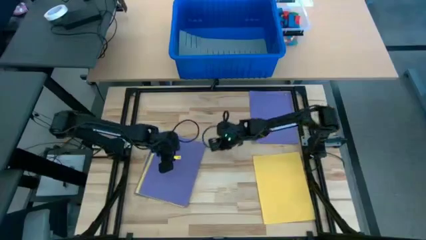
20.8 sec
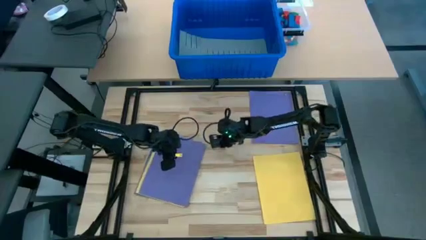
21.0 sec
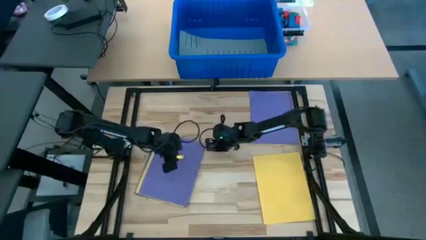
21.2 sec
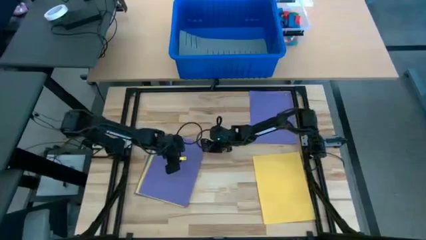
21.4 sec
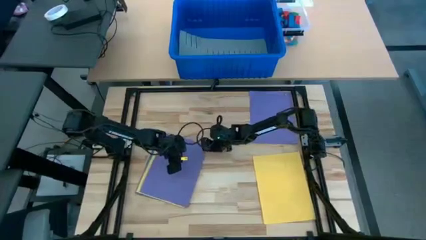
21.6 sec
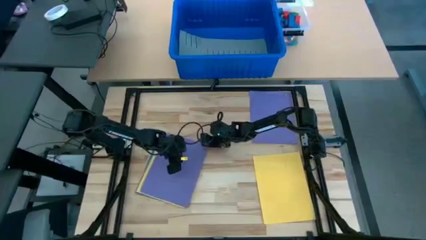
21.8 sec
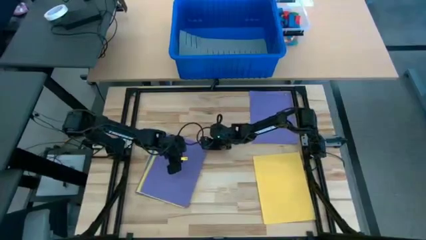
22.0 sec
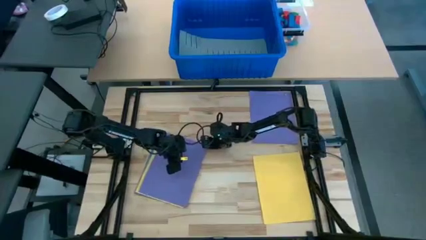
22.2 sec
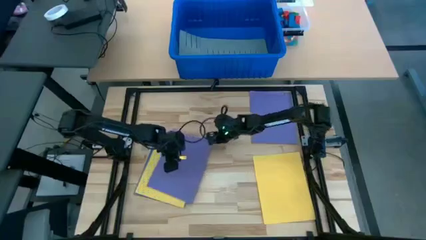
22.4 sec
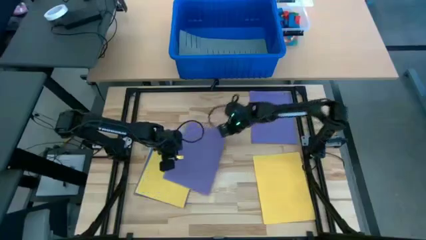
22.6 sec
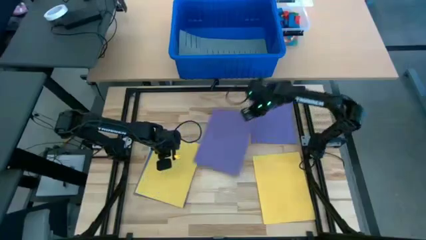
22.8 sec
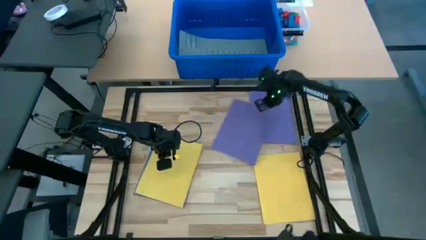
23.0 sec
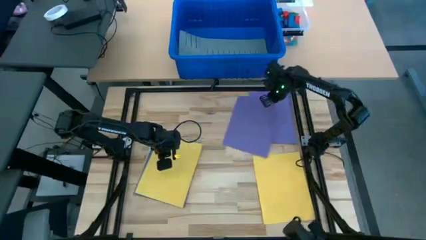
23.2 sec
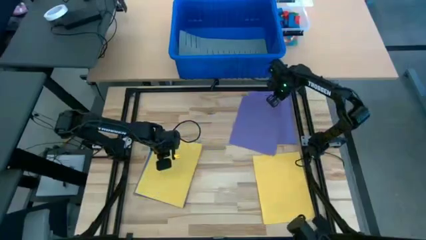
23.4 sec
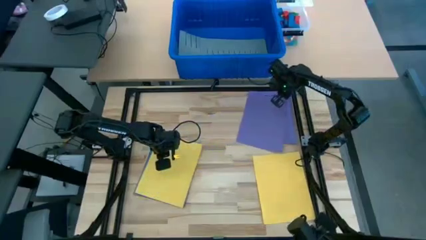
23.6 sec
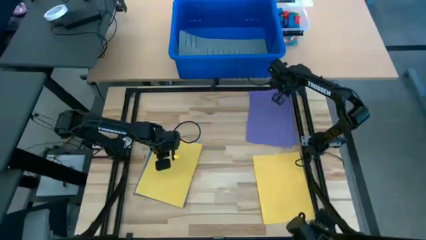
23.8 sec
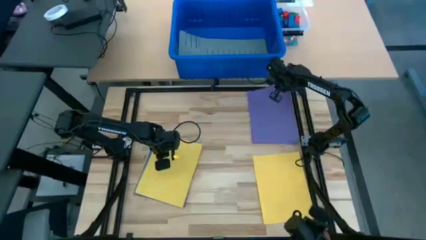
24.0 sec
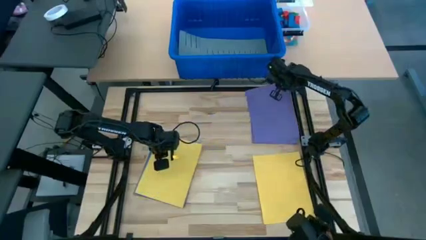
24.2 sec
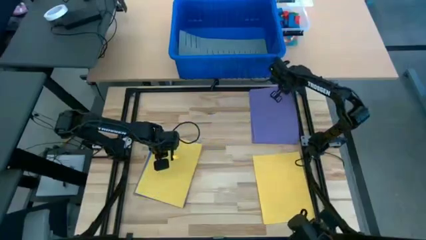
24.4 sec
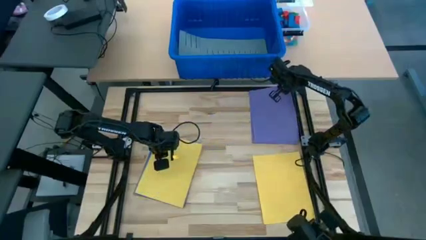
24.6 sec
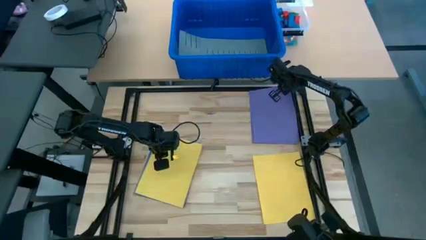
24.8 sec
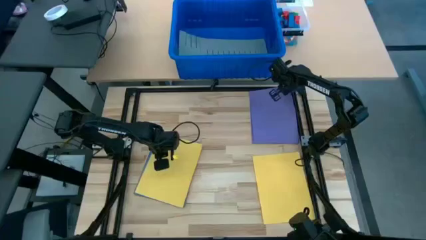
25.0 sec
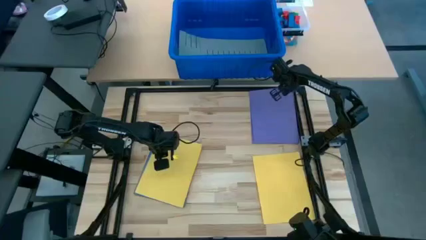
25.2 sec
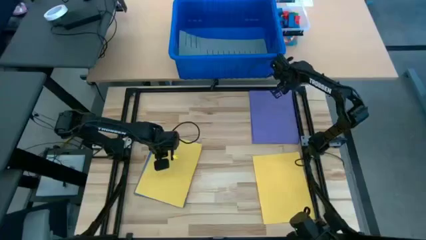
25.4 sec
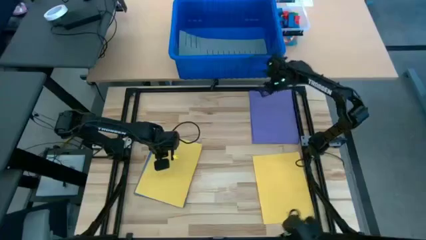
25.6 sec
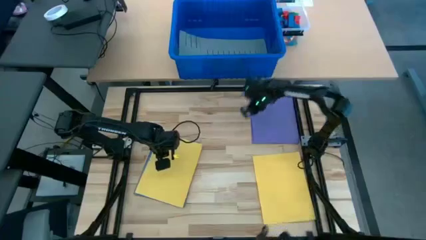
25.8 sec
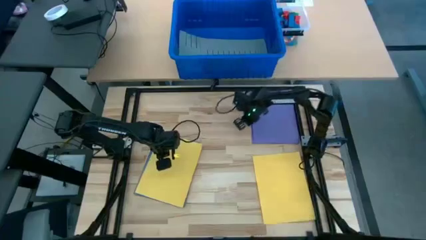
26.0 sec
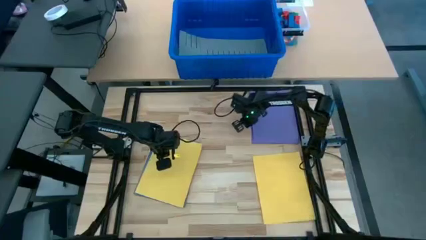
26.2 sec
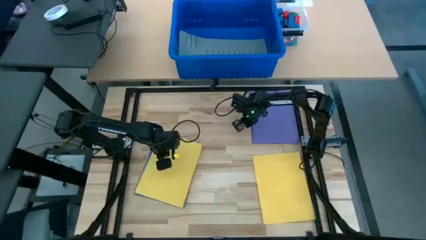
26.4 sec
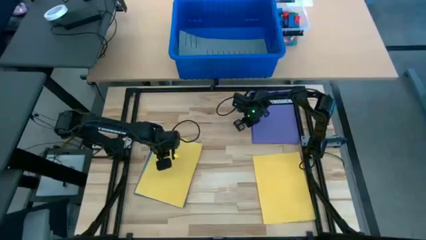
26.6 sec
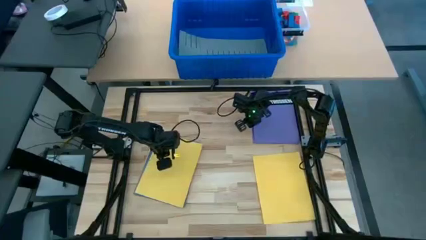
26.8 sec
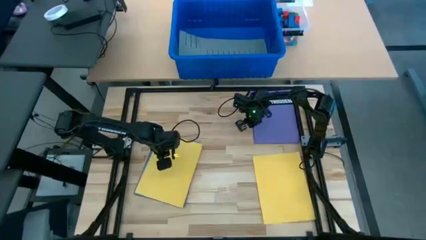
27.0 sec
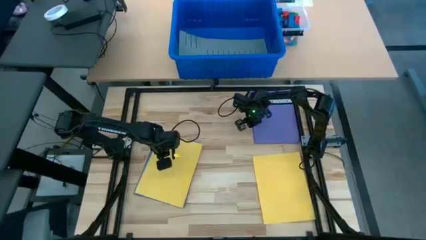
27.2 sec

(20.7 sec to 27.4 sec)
Task: Organize paper
Stack the purple paper on top of the other purple paper

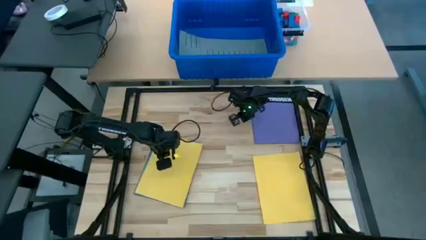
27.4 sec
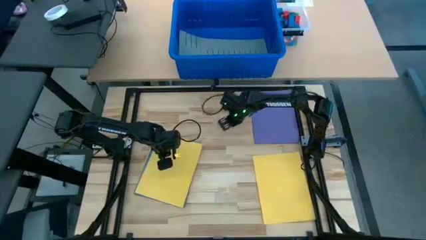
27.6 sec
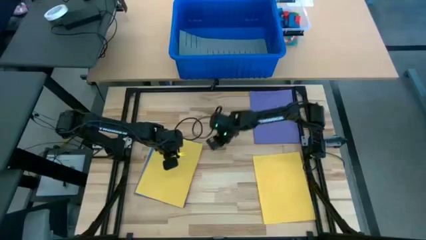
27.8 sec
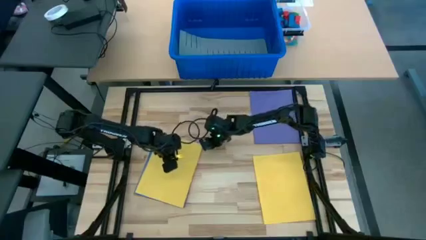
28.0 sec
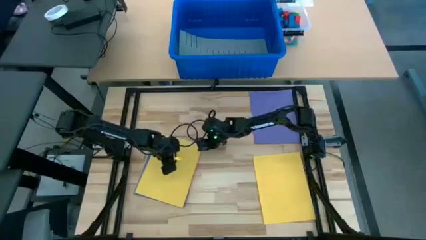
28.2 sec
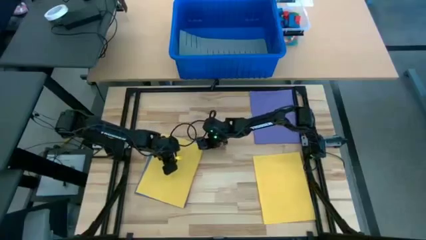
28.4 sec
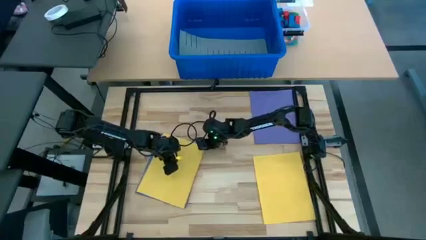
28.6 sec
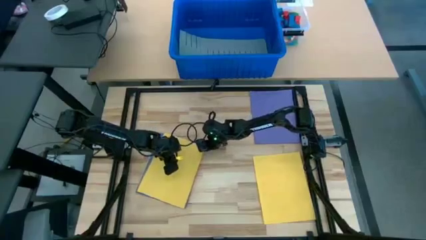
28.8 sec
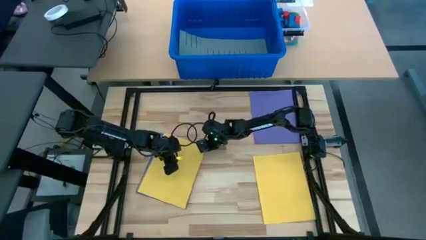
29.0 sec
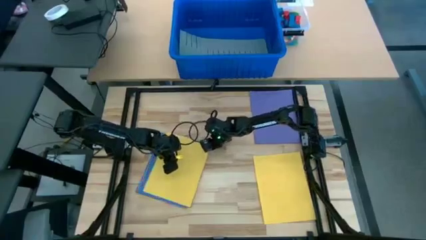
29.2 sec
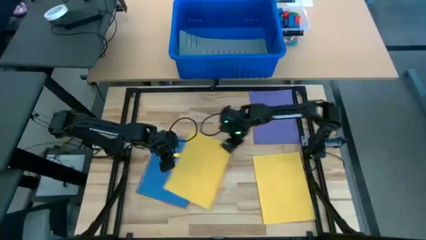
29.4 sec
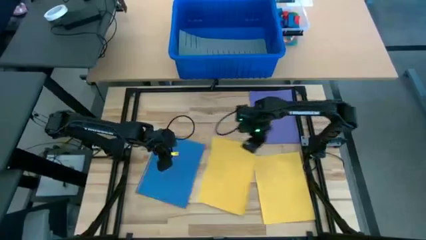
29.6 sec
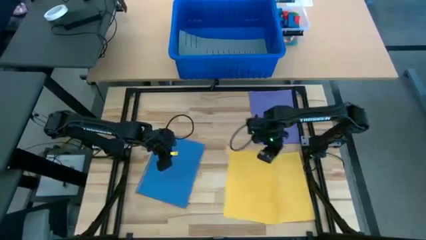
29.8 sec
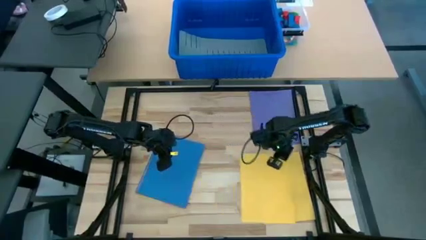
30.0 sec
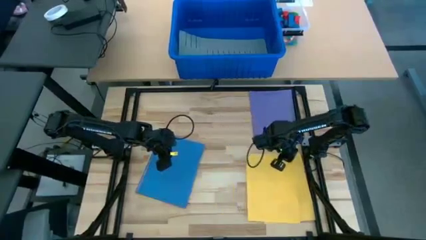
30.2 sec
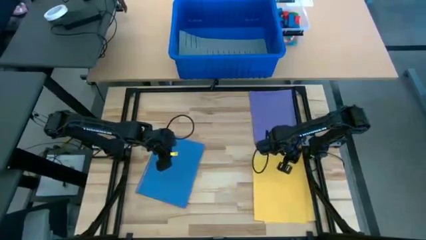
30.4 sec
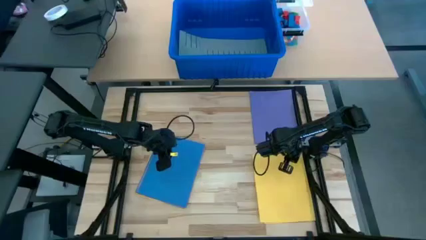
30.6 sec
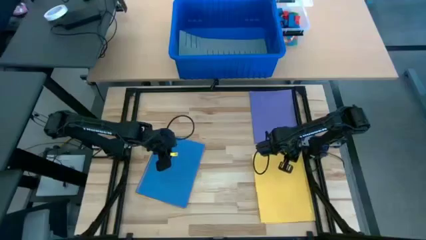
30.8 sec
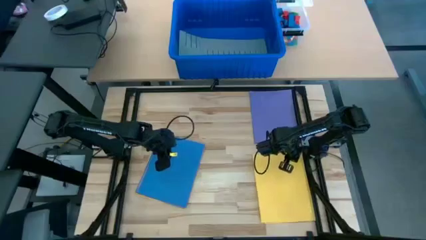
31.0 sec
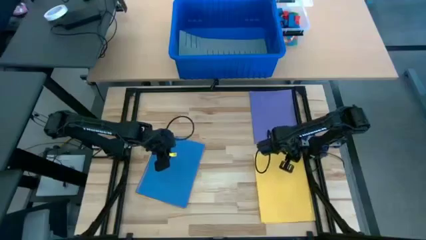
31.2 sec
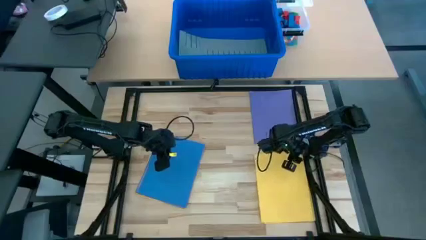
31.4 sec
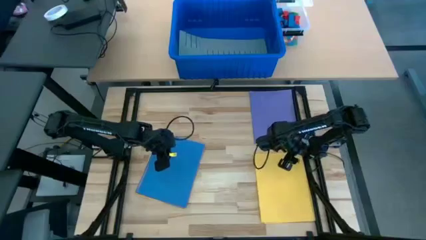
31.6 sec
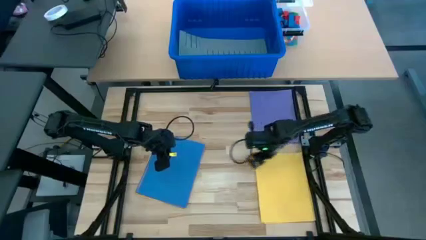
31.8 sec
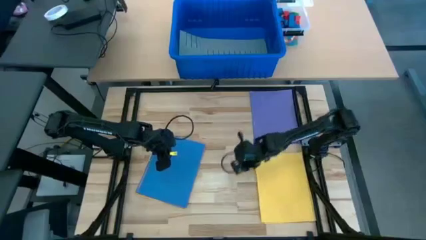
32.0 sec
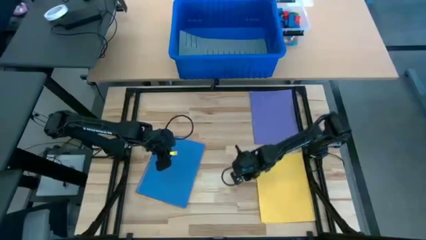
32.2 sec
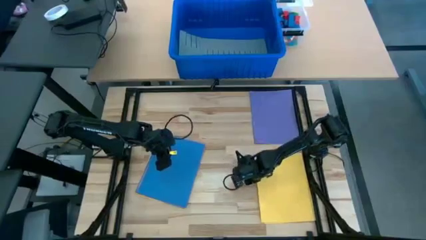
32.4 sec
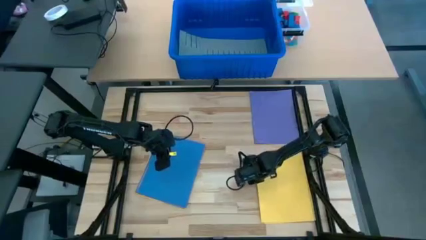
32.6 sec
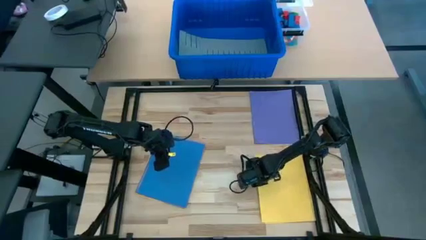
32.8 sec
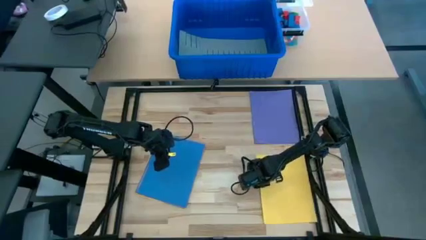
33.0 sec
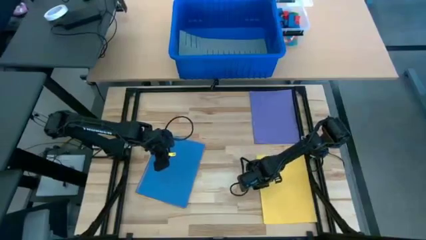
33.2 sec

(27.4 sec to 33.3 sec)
Stack the yellow paper on top of the other yellow paper
